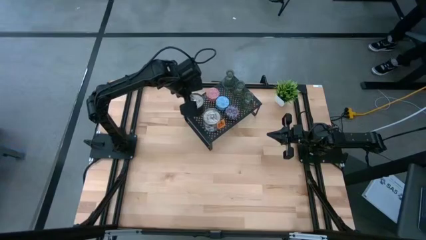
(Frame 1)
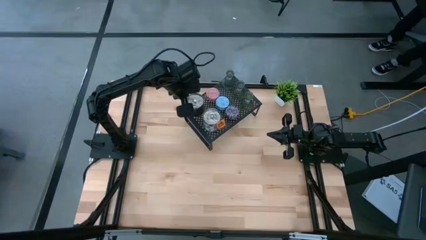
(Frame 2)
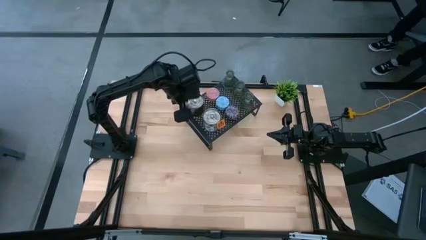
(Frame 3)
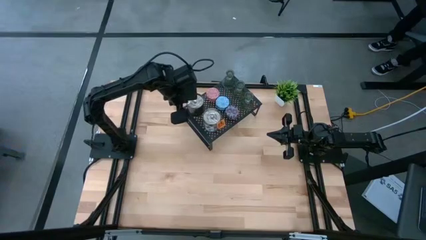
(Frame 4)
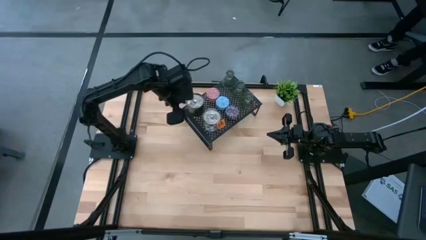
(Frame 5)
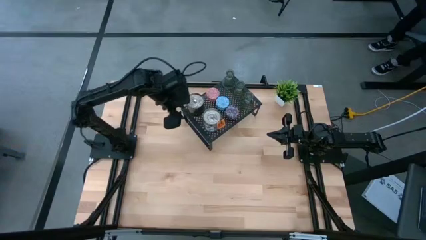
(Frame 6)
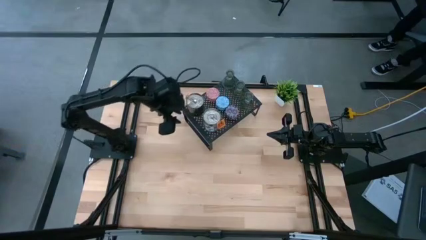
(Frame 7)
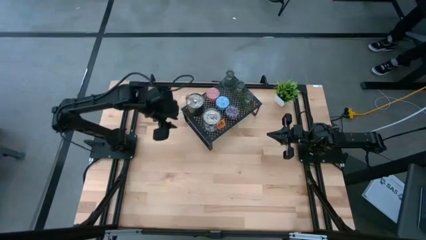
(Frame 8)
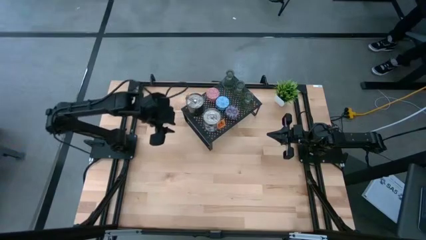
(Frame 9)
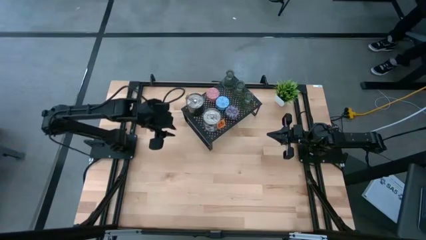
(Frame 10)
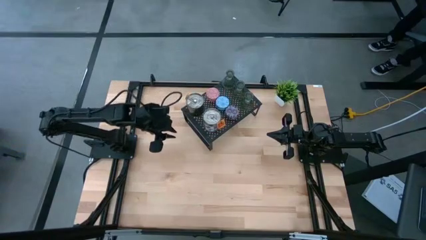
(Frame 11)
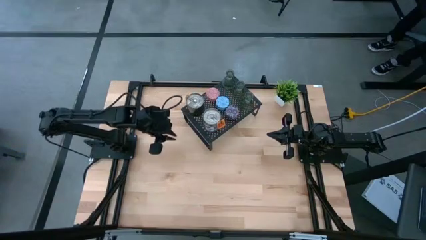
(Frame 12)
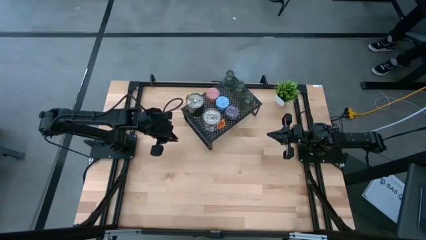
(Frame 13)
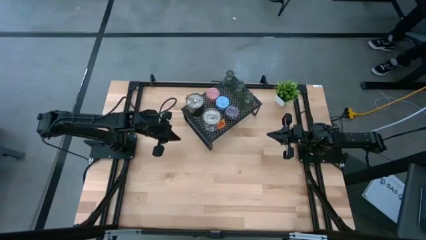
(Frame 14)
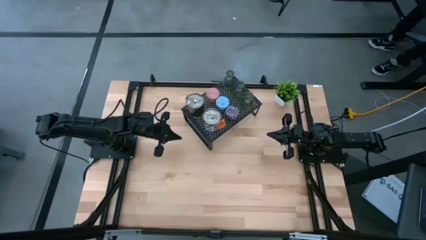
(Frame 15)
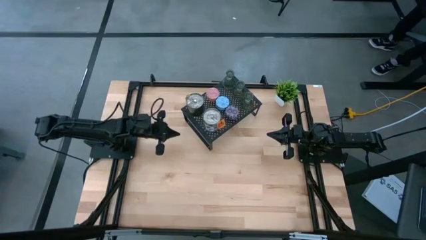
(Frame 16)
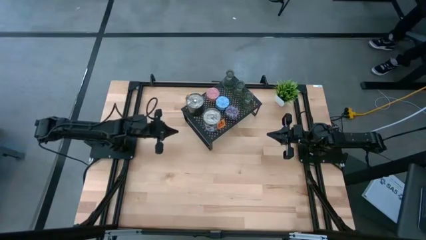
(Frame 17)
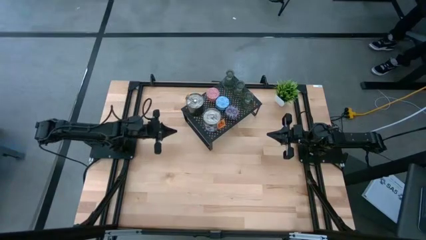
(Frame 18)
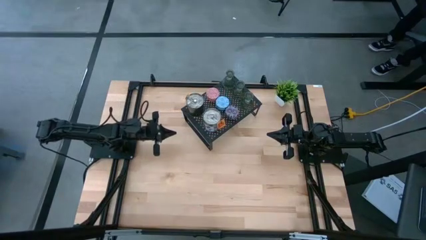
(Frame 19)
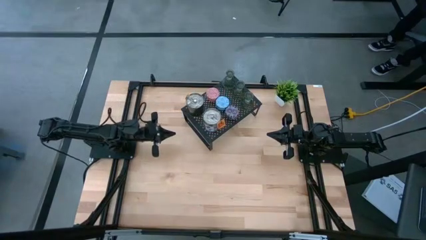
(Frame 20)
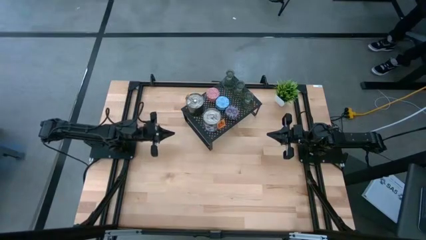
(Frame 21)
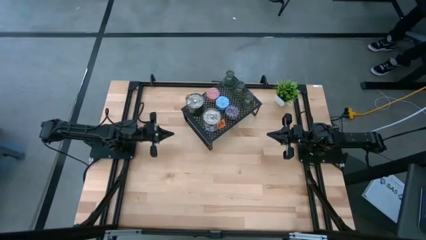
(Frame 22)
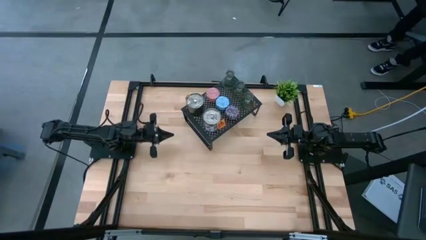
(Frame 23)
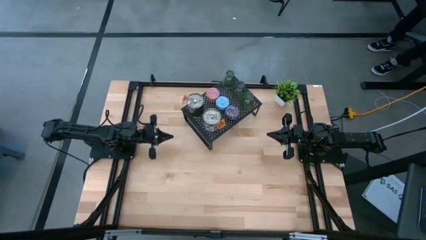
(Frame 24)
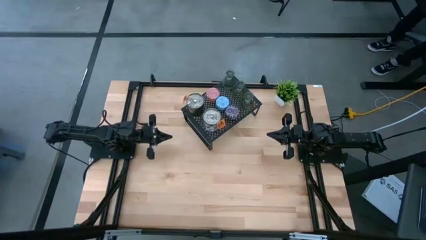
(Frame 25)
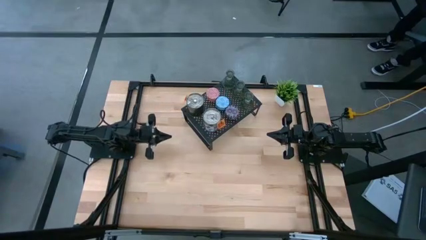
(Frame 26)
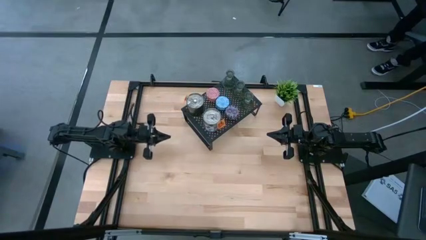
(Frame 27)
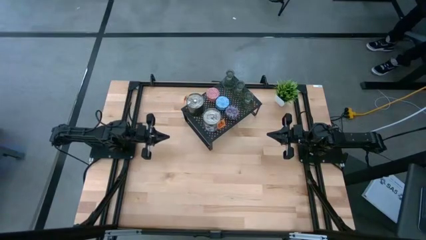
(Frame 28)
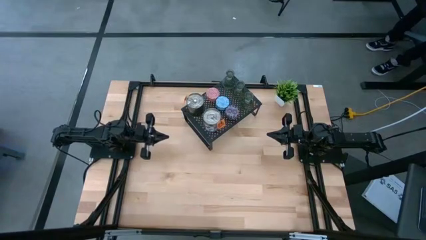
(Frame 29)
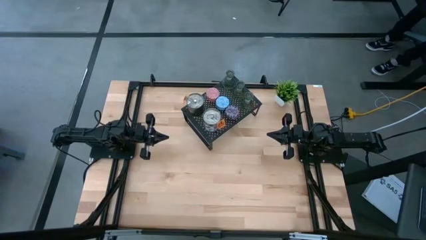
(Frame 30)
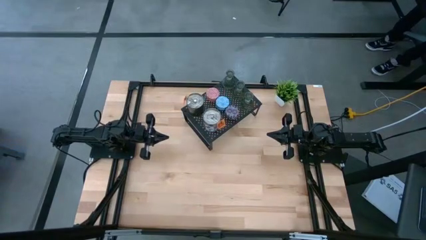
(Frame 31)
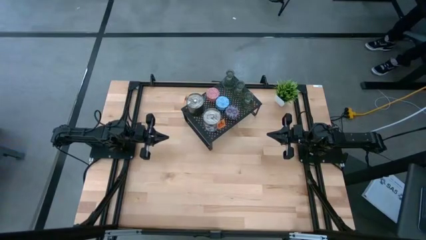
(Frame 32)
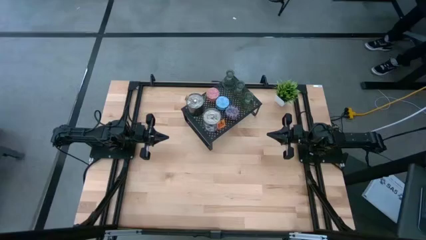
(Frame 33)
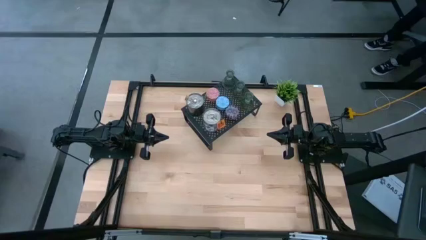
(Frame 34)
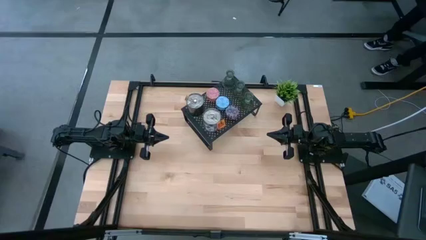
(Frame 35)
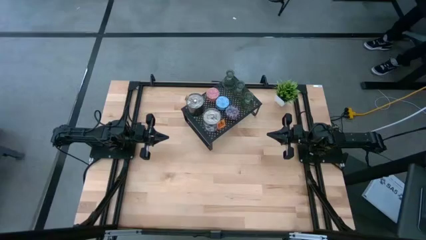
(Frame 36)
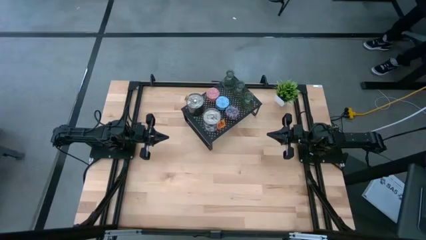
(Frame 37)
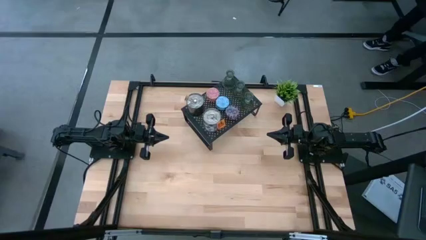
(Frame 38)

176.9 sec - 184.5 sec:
Task: Pick & Place candle stick holders
Return to Home Position

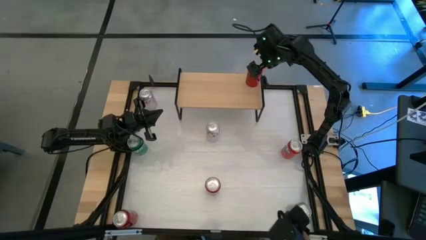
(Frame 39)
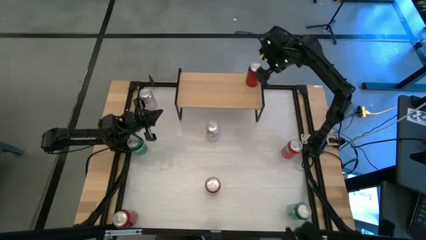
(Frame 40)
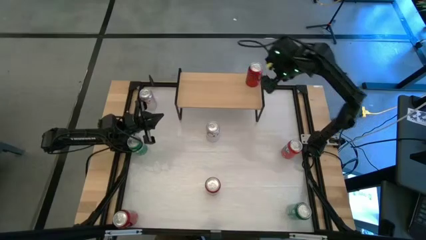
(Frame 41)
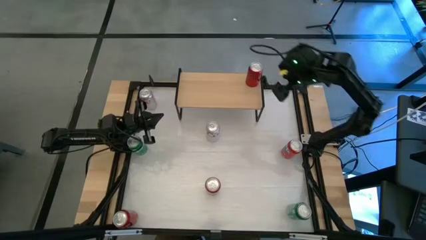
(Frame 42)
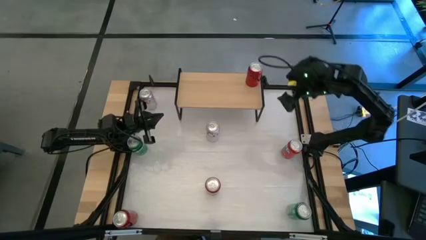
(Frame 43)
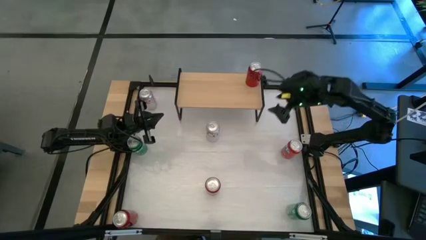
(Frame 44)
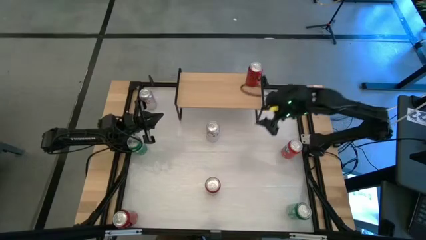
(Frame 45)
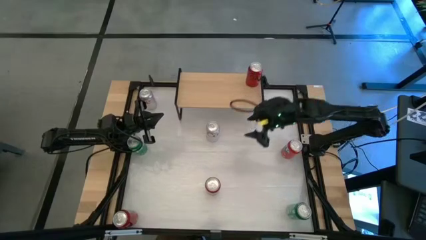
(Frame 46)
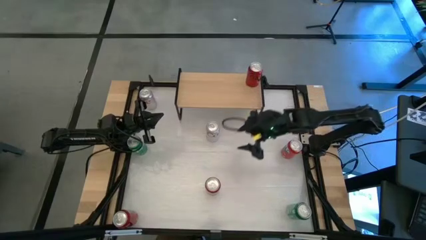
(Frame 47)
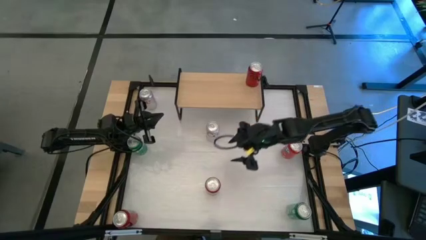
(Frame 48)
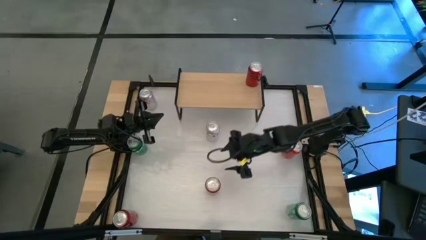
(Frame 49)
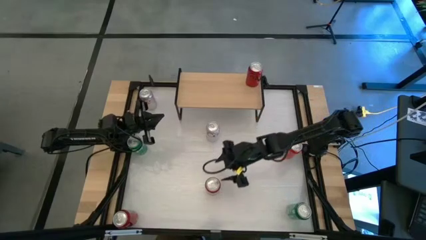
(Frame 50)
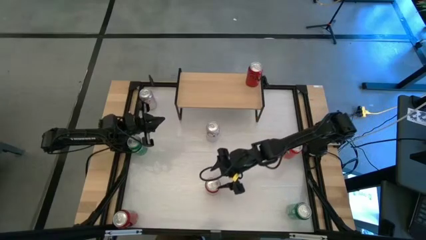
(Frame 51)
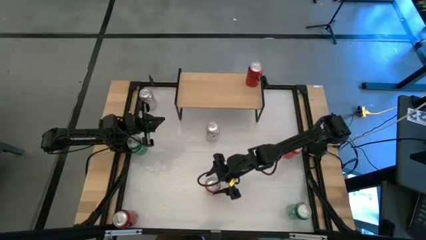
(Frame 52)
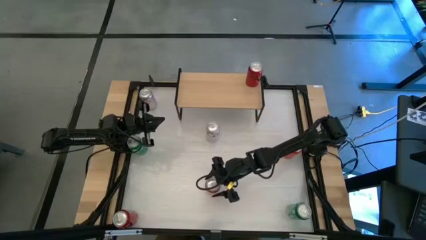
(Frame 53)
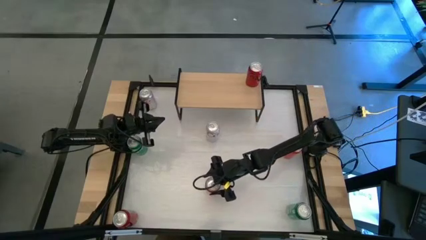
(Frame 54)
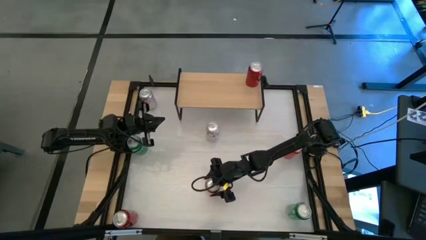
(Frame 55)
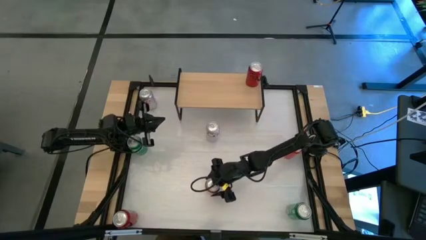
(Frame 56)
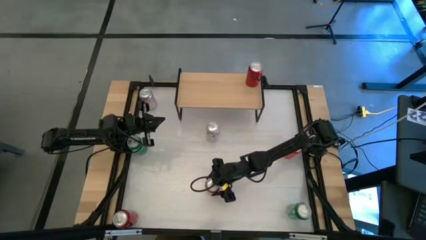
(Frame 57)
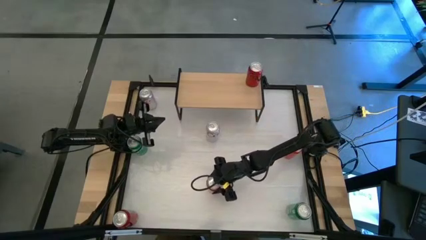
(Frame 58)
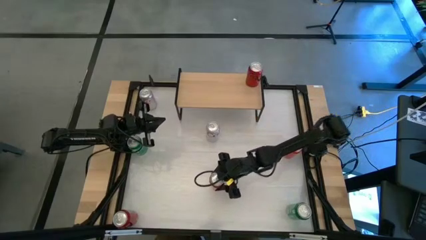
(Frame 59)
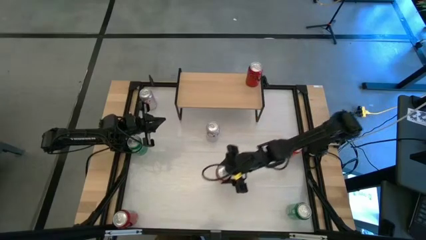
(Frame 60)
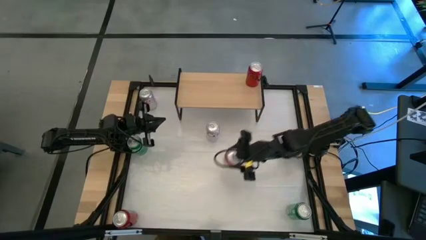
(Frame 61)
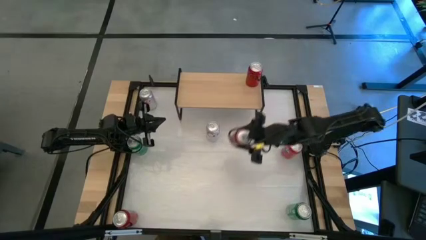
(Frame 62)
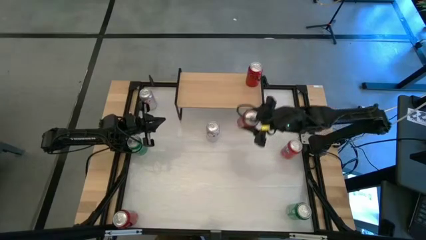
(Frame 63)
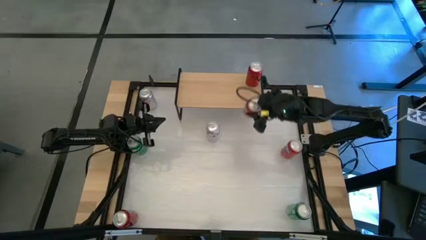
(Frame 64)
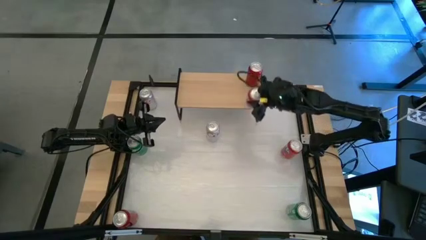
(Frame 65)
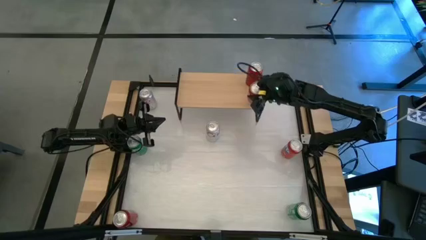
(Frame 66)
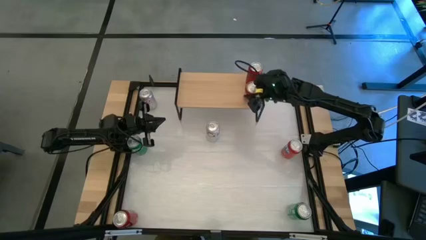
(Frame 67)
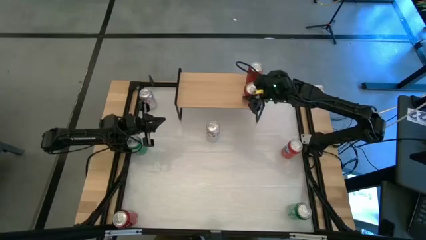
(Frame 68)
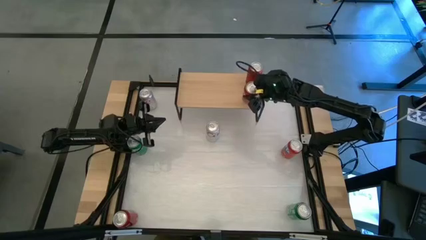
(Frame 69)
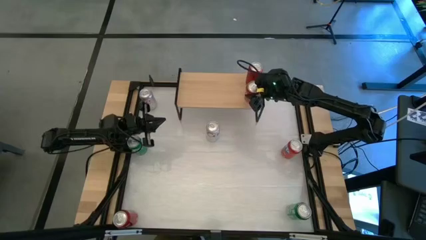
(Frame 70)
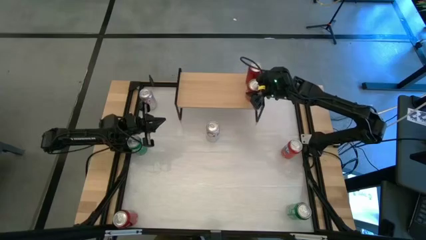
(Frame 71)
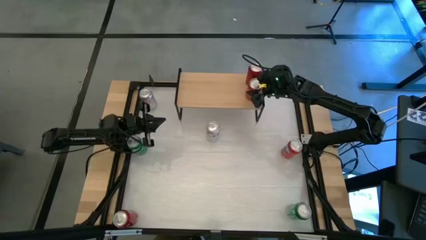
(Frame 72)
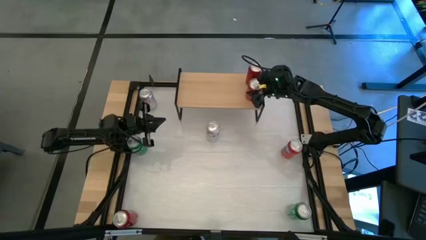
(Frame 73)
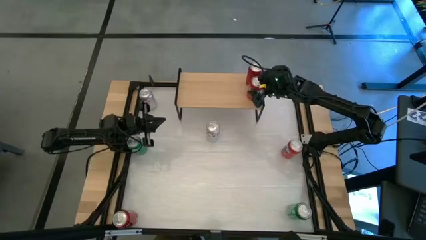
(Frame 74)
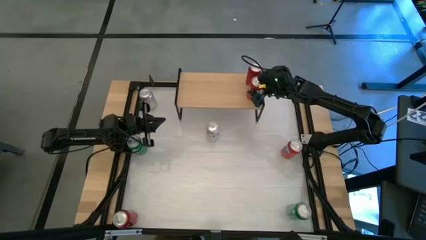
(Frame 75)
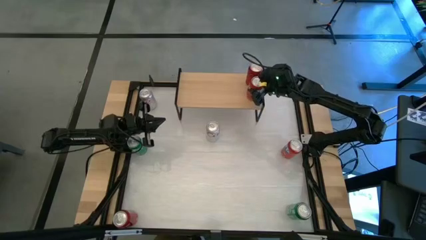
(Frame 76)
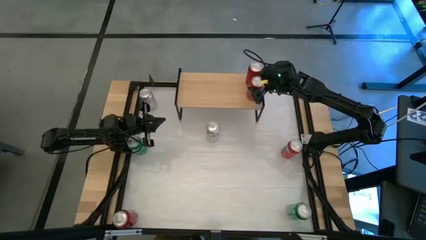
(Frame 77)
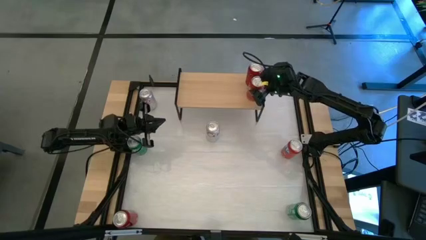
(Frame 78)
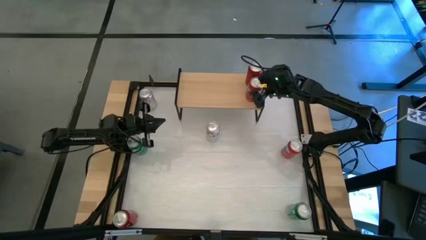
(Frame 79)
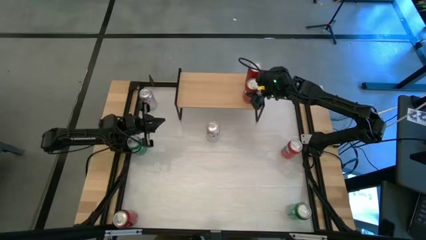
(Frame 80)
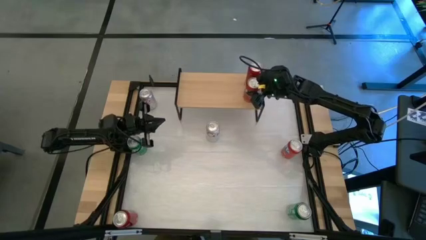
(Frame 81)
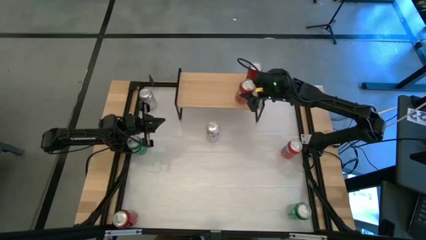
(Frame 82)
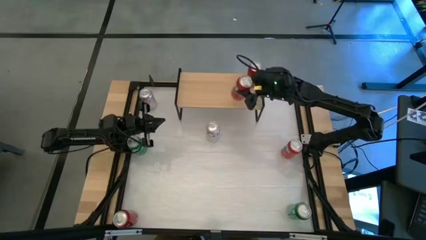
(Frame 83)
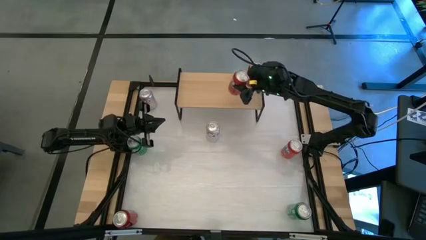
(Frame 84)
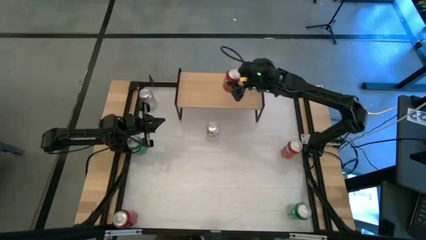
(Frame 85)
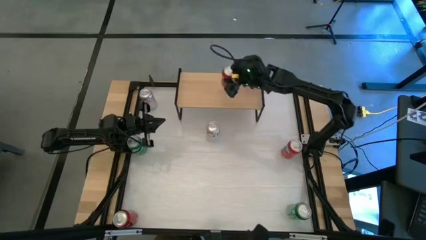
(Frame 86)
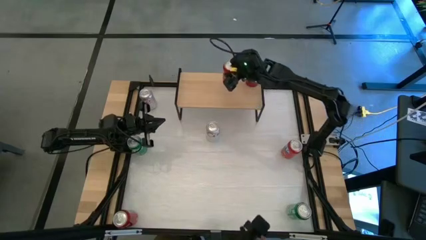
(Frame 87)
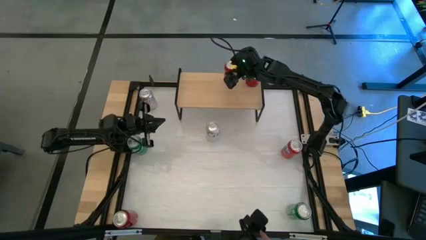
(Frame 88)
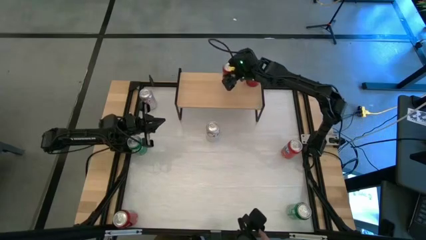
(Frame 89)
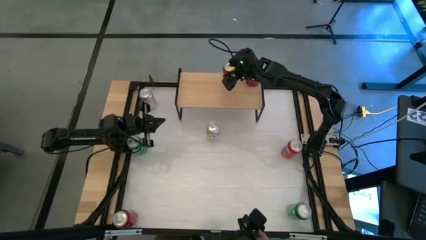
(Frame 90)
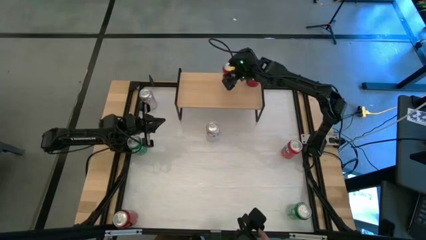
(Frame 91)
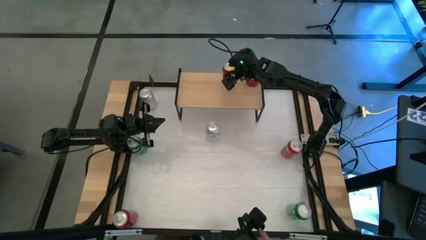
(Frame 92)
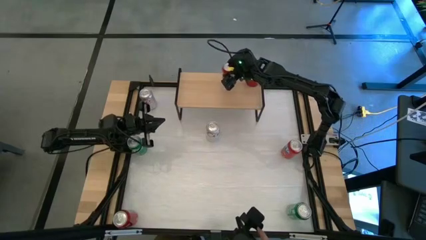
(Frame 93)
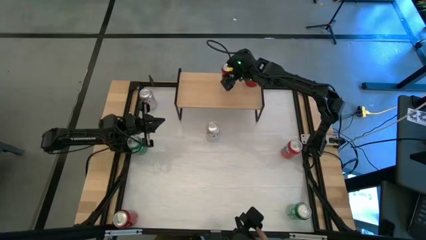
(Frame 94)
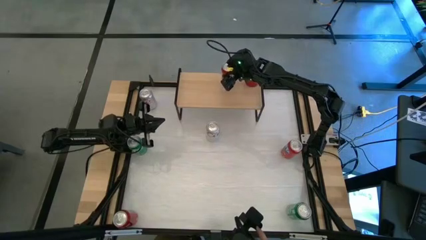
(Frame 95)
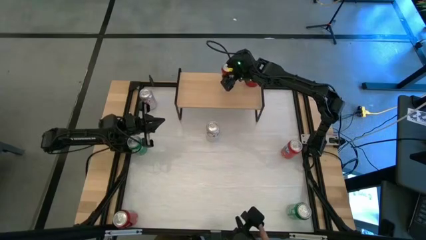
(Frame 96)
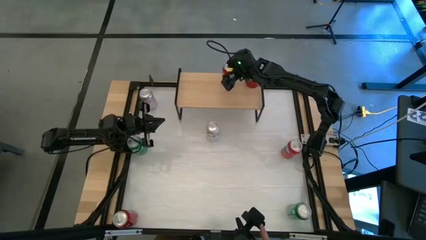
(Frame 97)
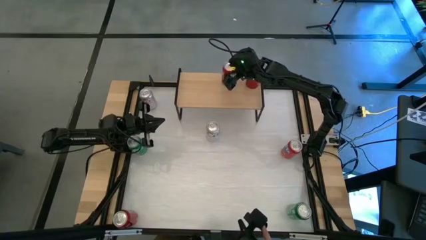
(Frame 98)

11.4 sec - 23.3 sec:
Task: Place canned beverage on shelf
Put the bottom orange soda can on the shelf
